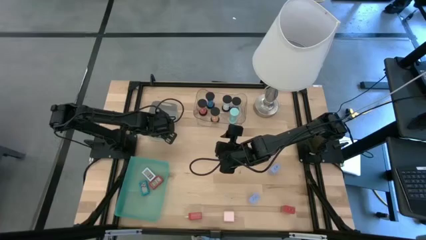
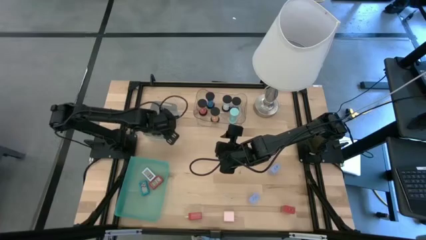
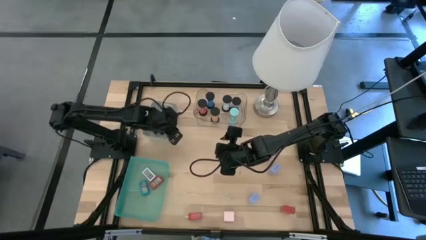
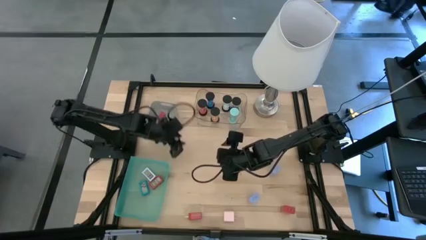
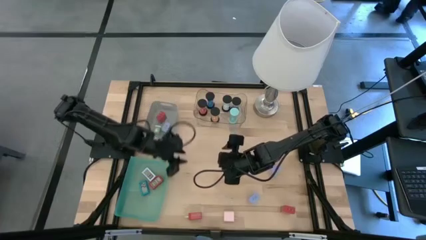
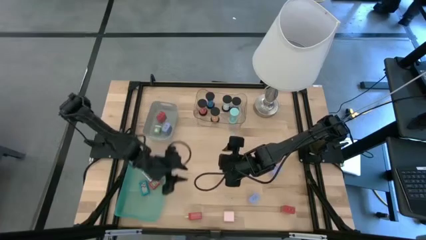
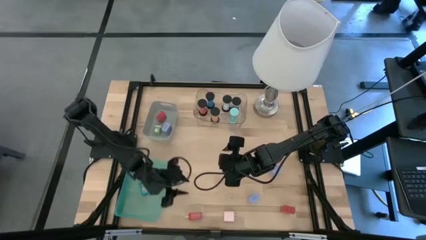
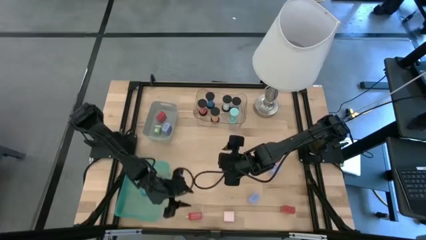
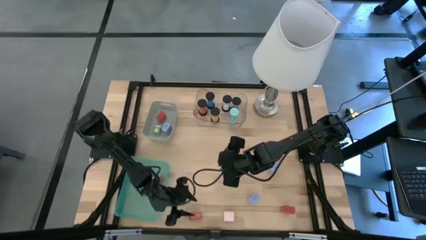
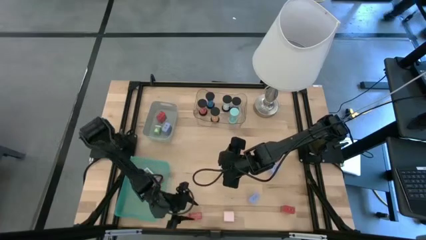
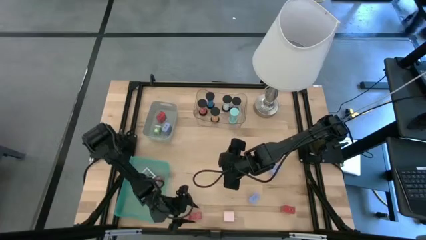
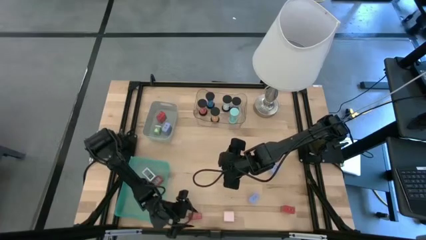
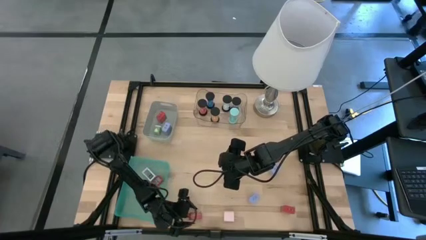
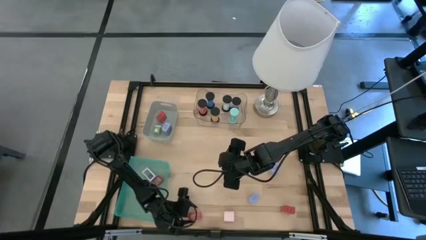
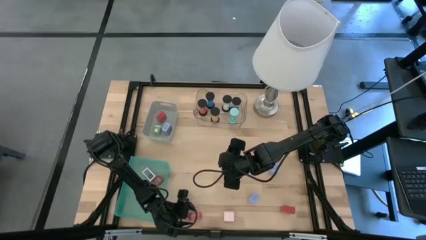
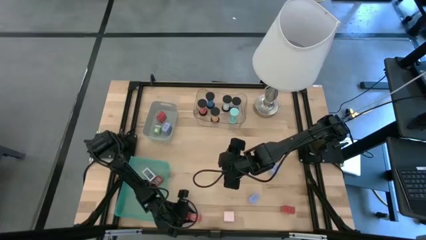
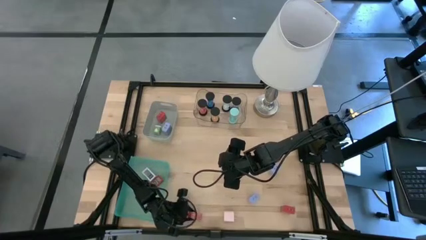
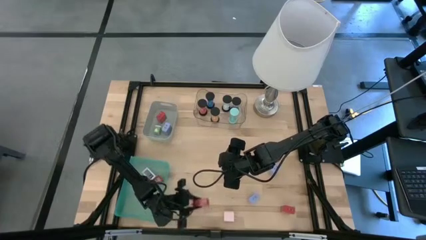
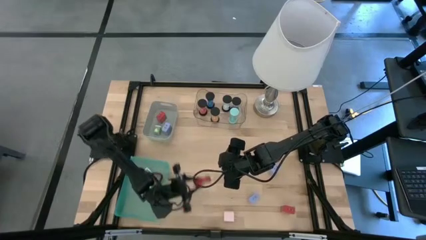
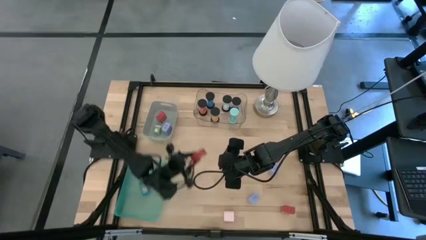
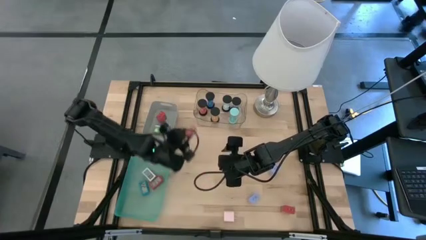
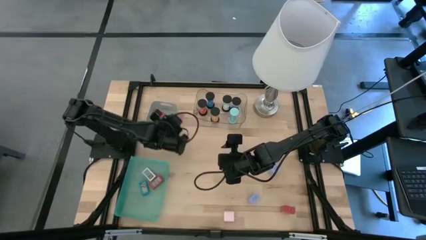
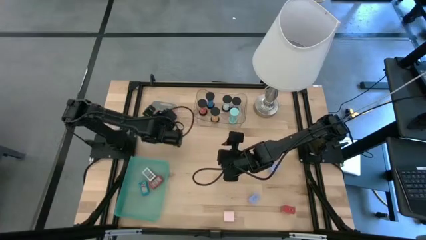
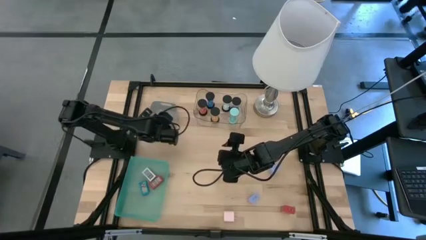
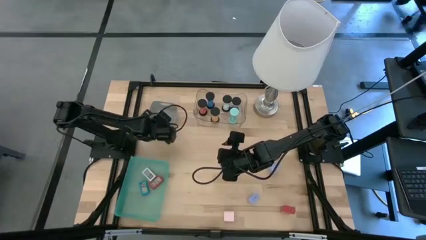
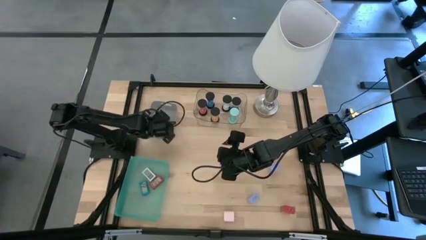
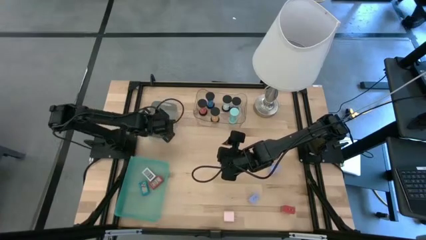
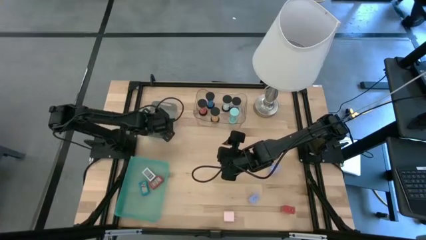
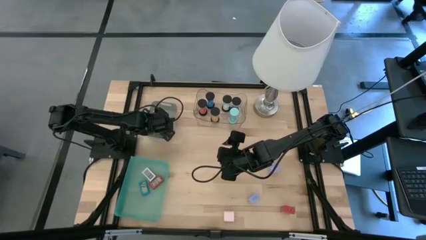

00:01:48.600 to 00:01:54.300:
Task: Pick & Place Office items
Put the left red charger adapter into the gray bin

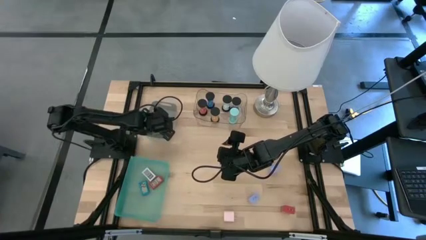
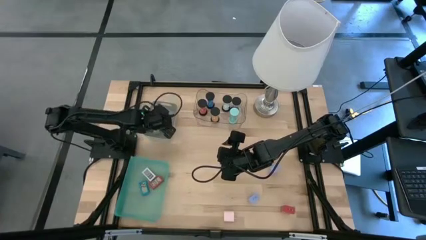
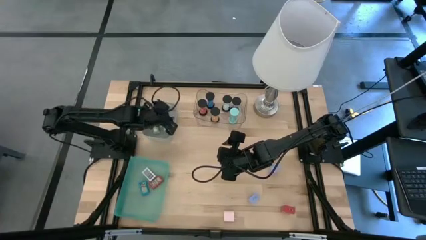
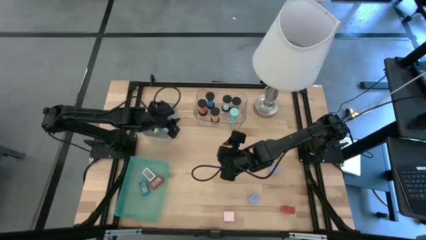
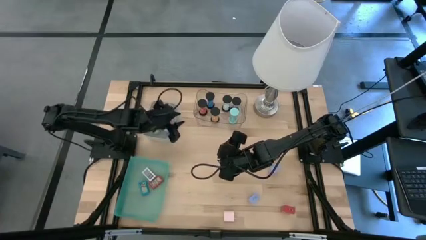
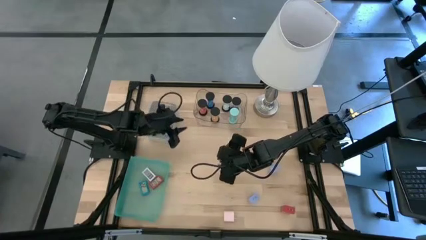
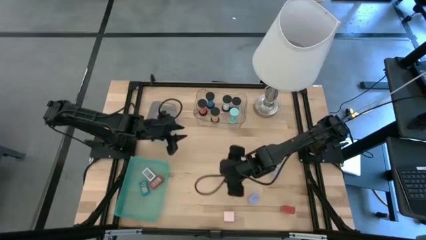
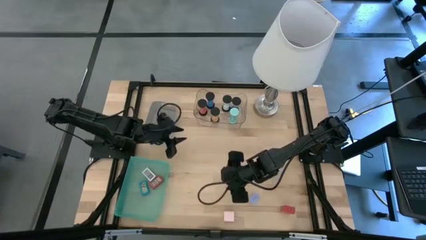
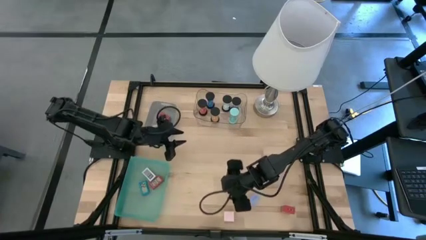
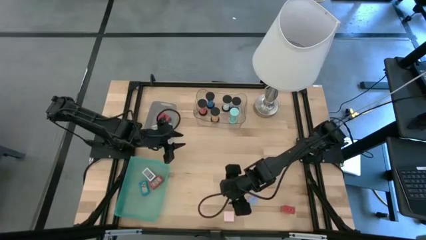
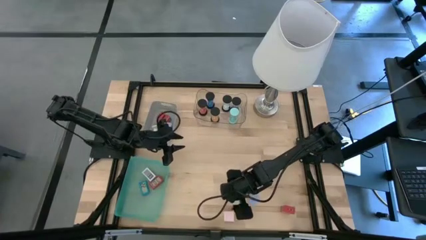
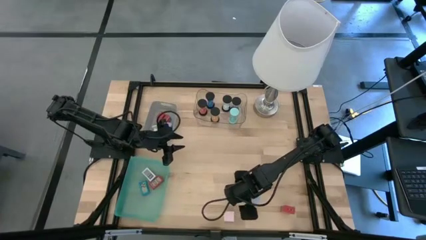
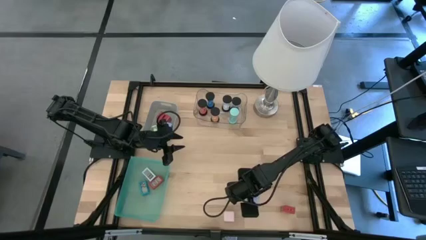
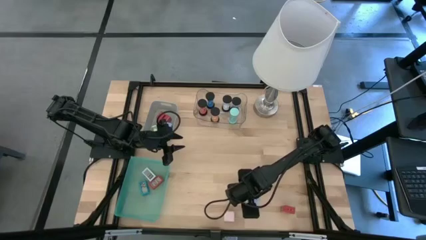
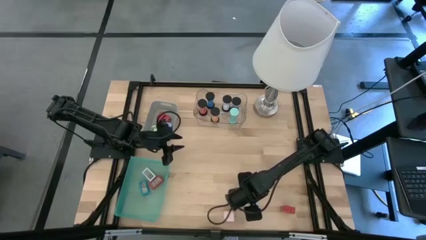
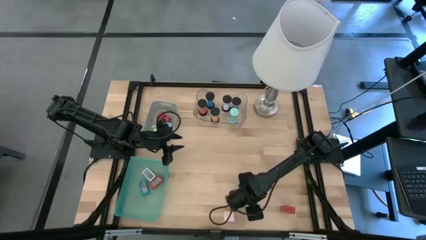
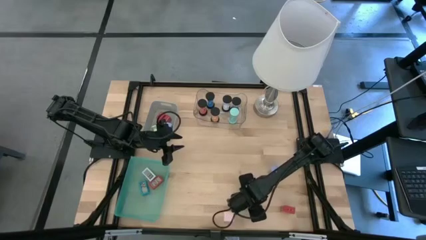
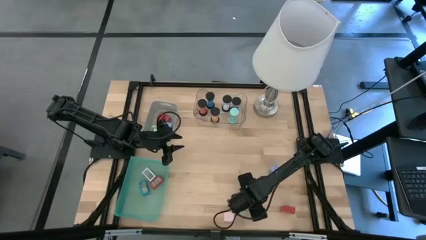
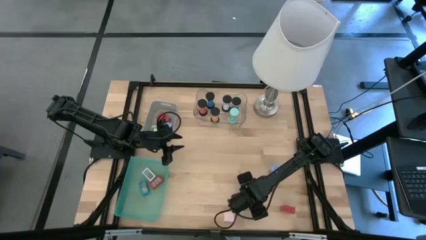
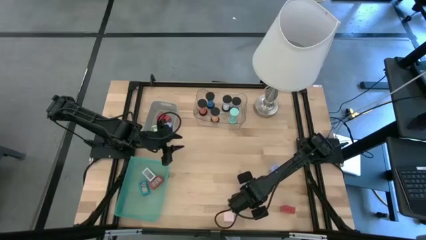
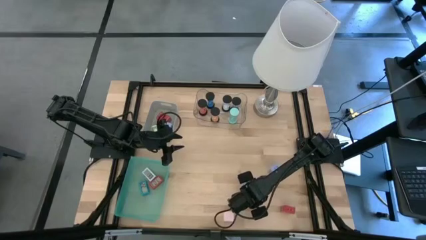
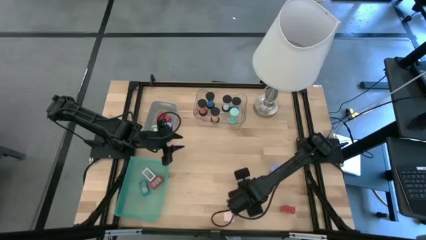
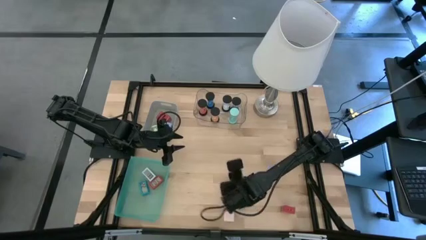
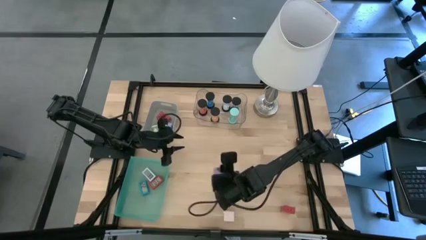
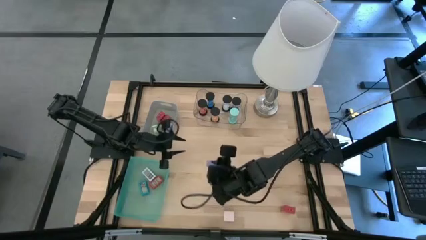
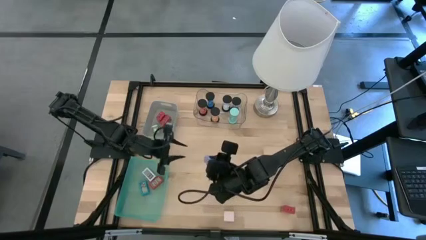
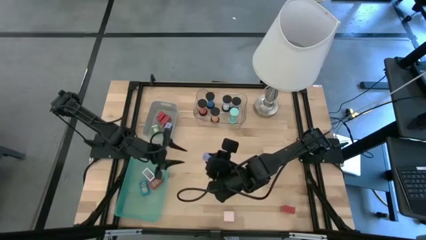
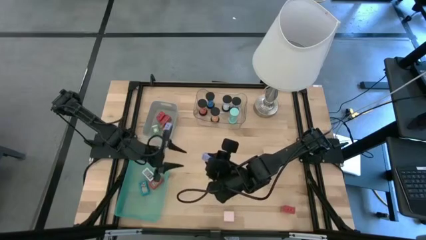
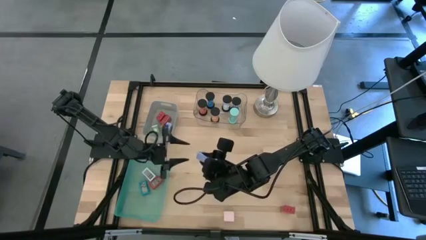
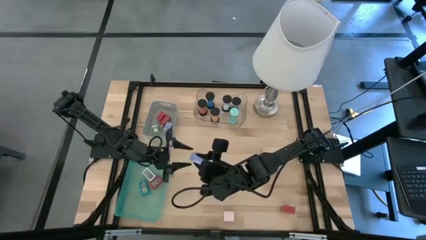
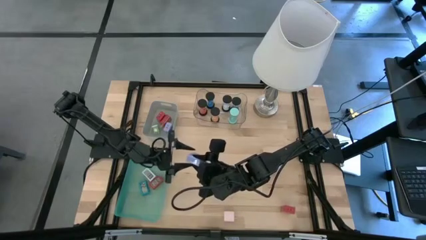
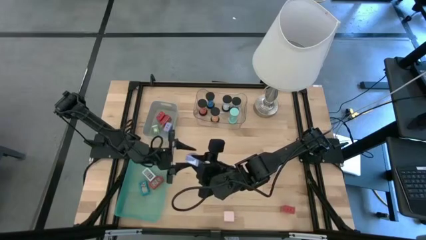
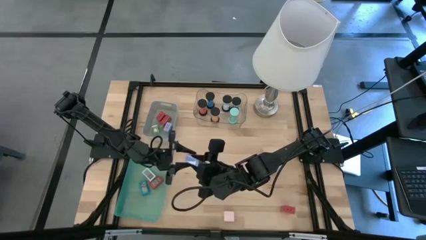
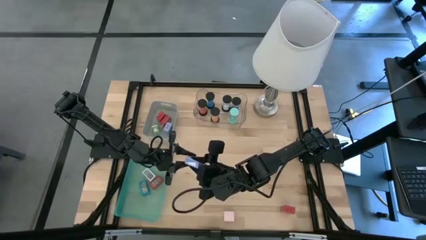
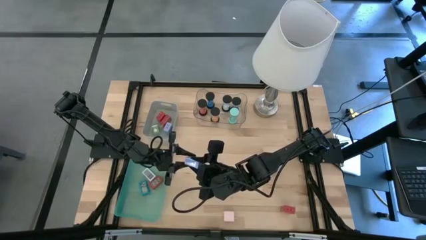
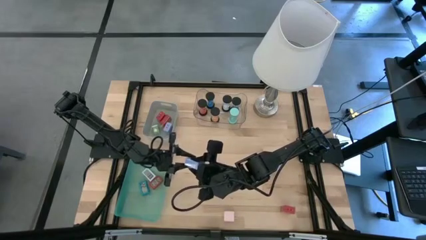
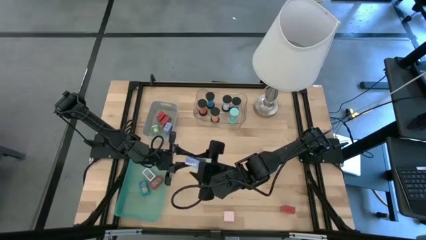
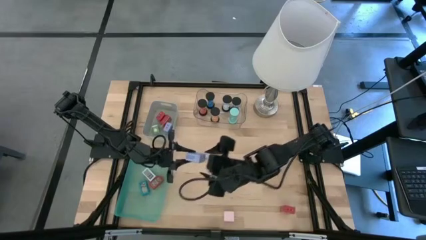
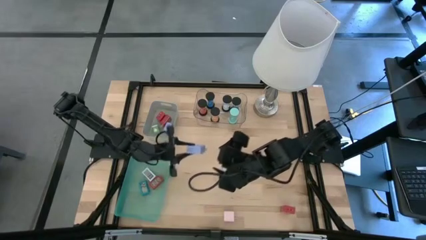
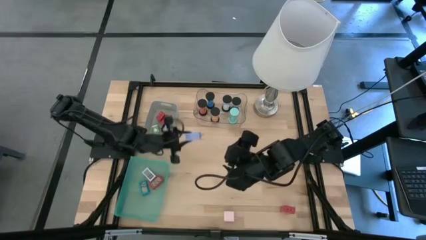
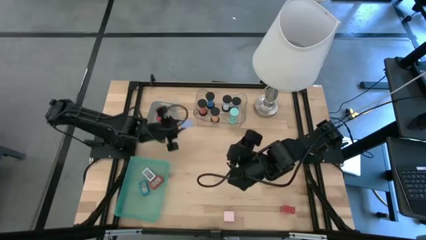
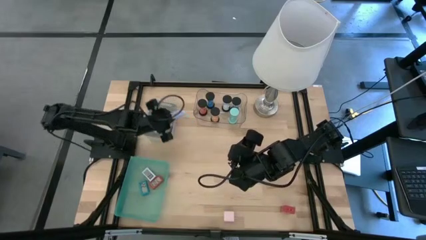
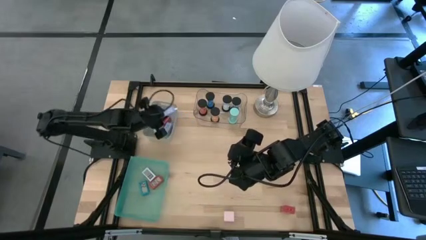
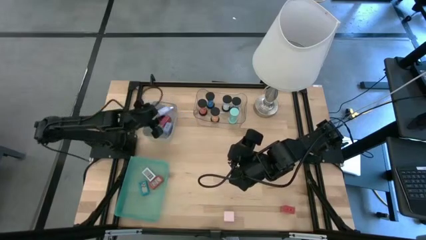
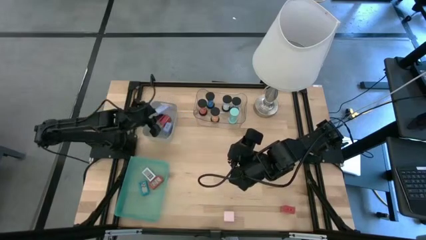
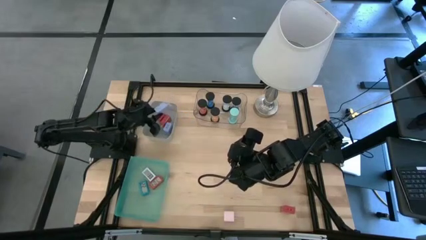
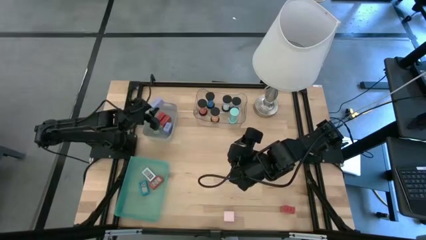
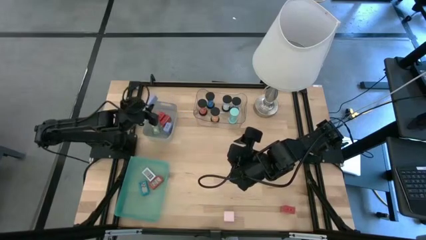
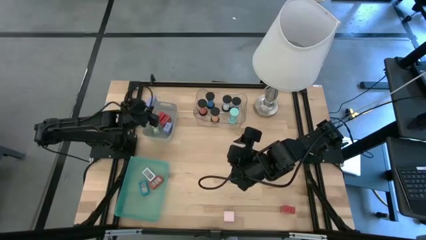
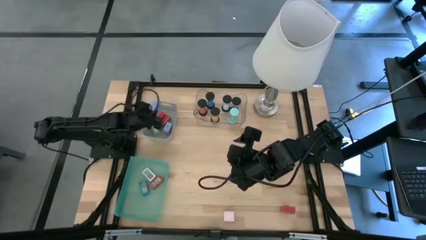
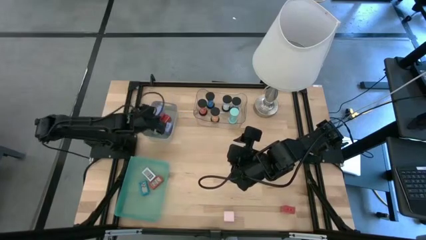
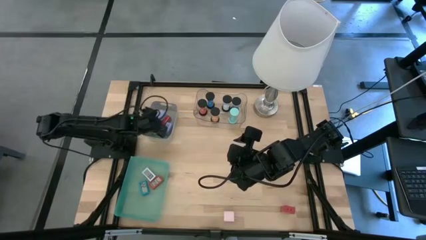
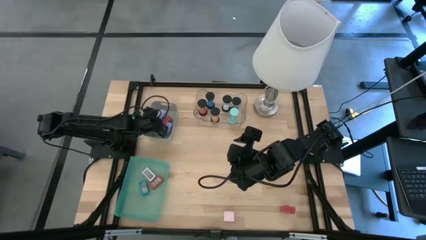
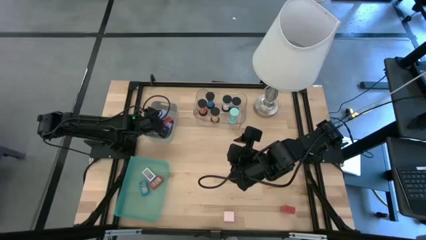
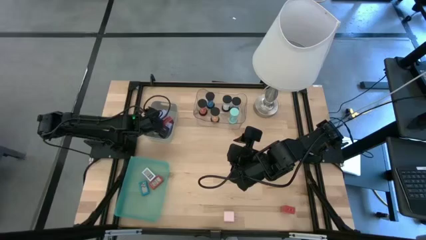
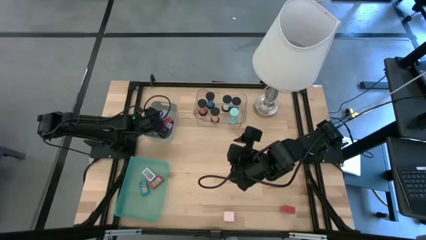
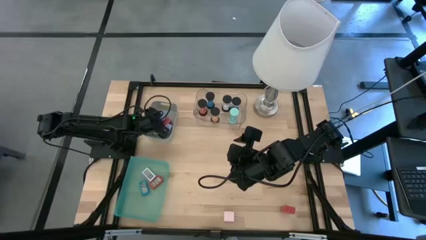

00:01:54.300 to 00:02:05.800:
Put the bottom light purple charger adapter into the gray bin
